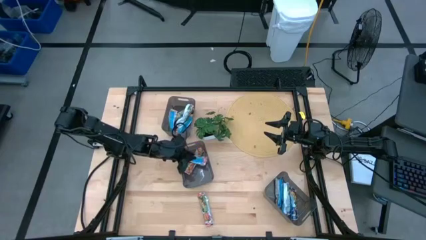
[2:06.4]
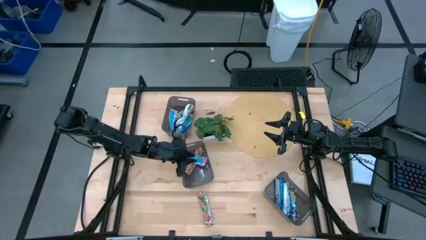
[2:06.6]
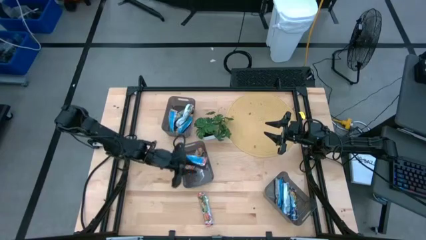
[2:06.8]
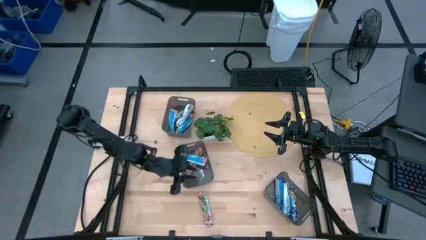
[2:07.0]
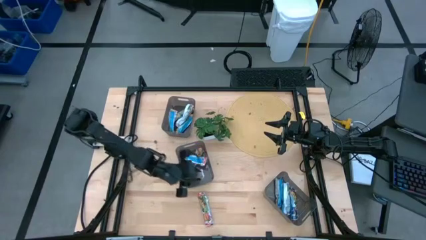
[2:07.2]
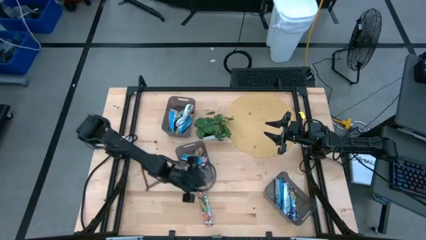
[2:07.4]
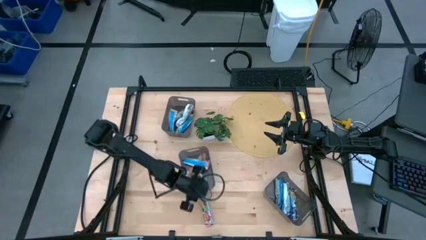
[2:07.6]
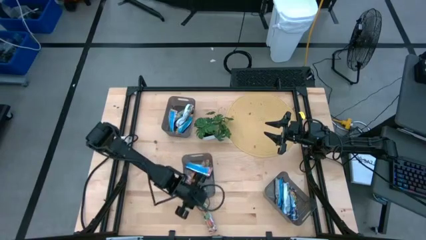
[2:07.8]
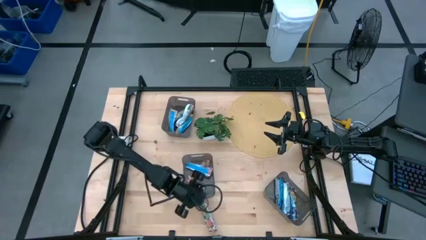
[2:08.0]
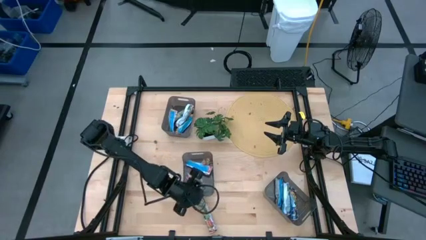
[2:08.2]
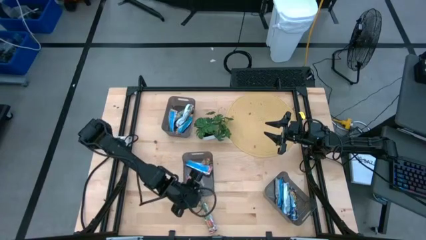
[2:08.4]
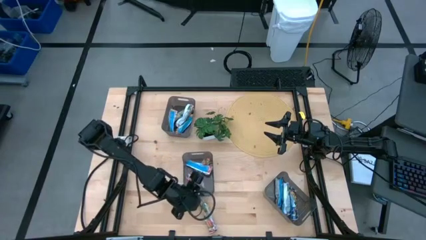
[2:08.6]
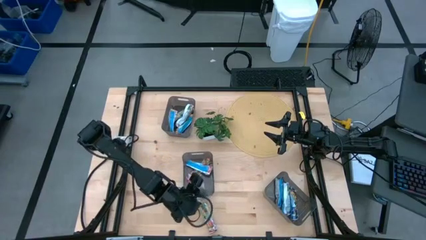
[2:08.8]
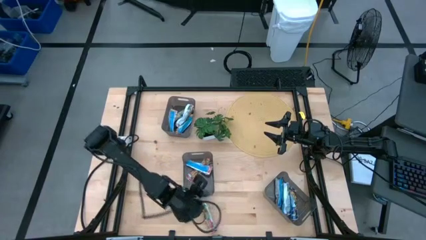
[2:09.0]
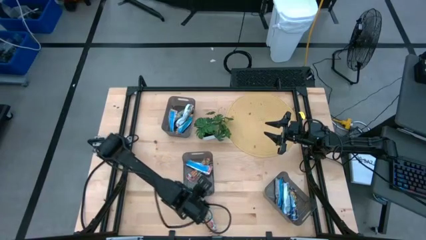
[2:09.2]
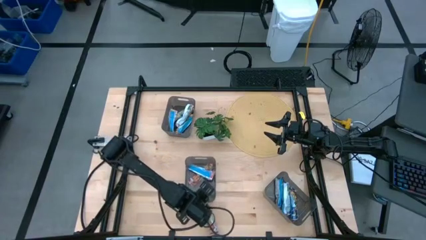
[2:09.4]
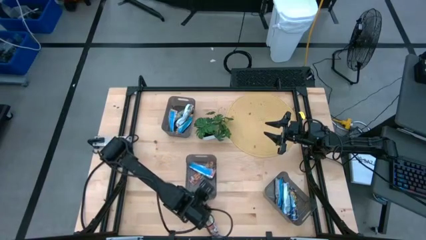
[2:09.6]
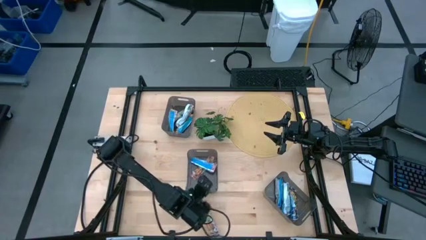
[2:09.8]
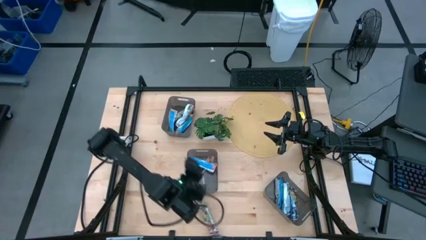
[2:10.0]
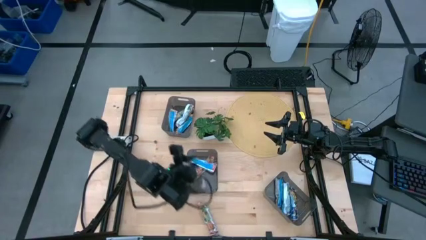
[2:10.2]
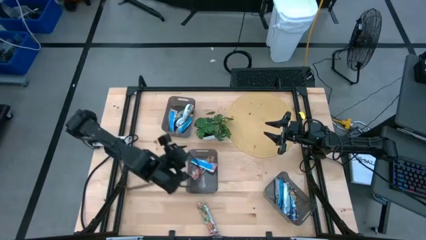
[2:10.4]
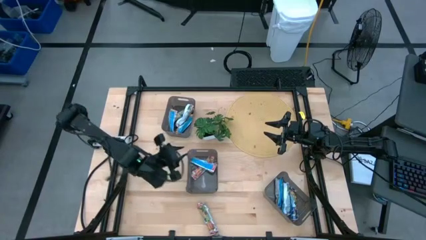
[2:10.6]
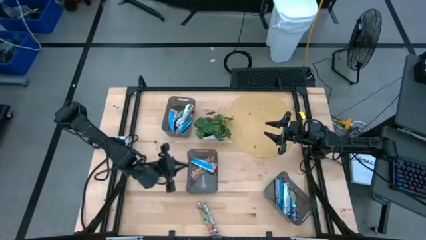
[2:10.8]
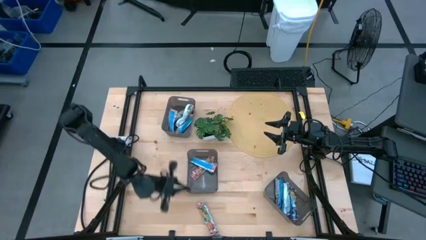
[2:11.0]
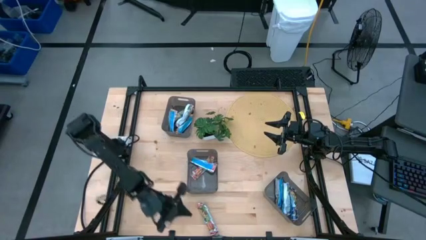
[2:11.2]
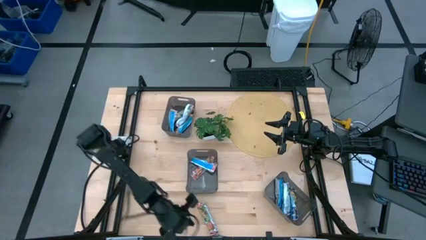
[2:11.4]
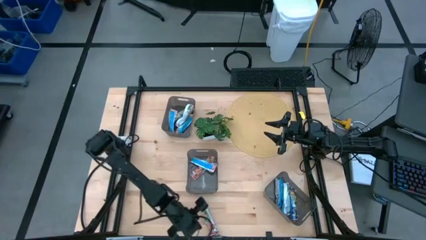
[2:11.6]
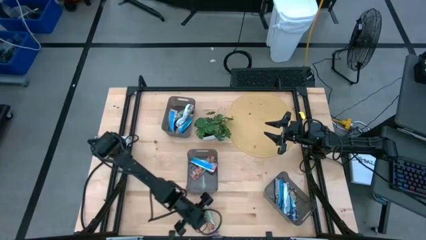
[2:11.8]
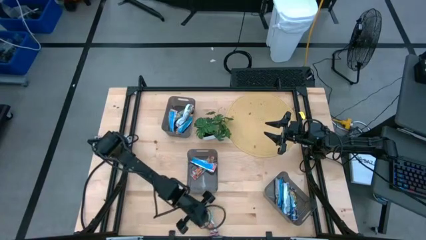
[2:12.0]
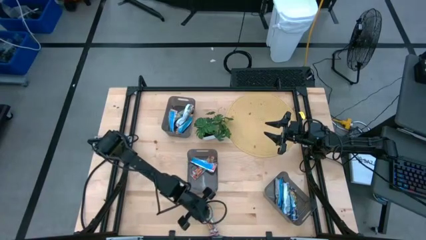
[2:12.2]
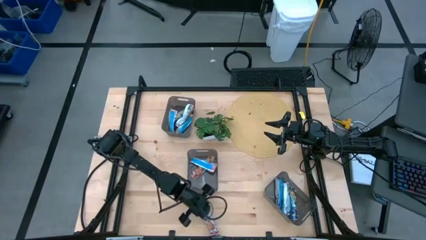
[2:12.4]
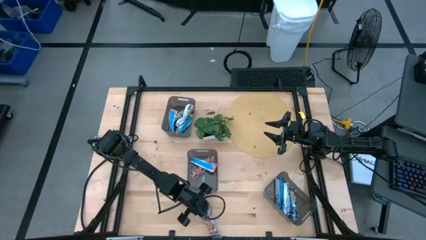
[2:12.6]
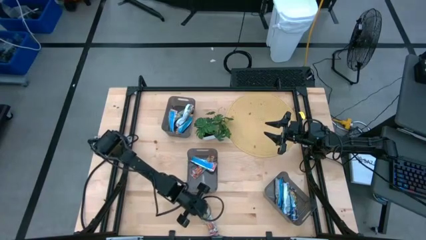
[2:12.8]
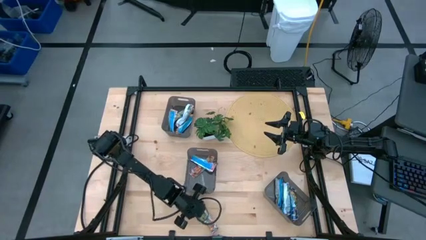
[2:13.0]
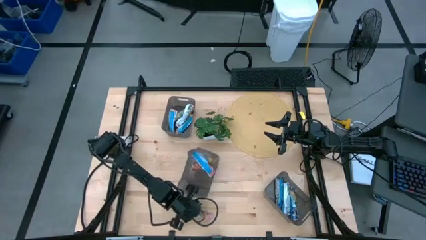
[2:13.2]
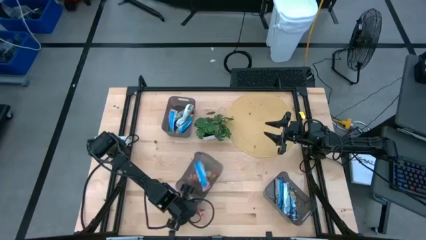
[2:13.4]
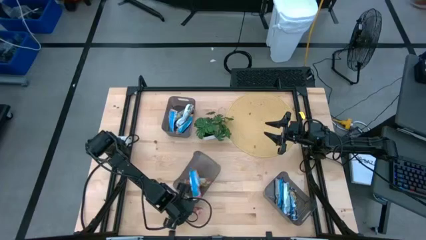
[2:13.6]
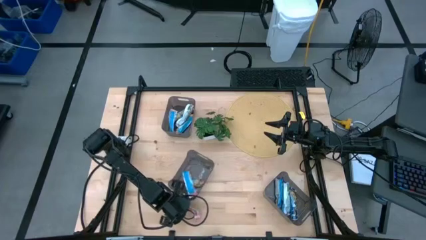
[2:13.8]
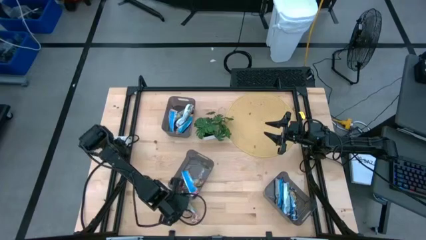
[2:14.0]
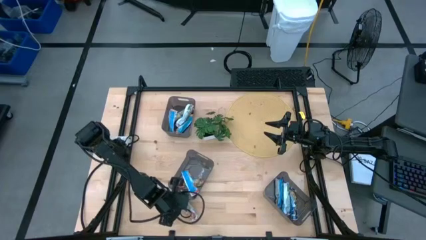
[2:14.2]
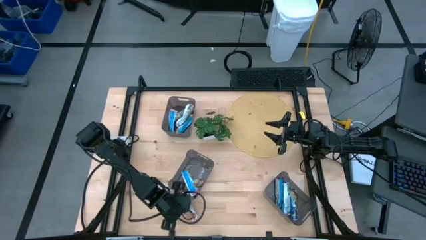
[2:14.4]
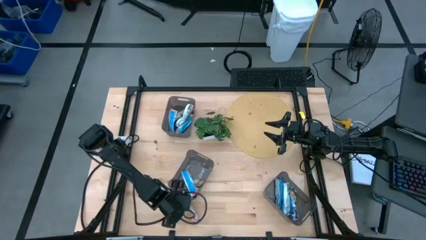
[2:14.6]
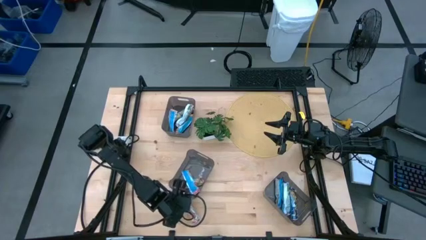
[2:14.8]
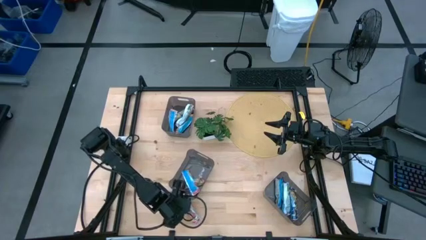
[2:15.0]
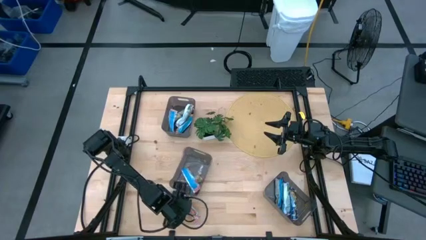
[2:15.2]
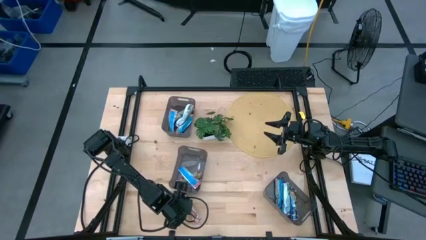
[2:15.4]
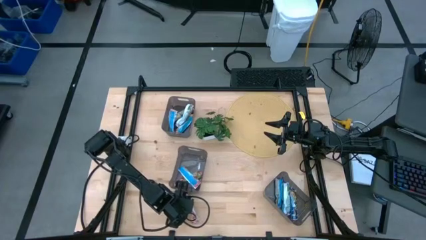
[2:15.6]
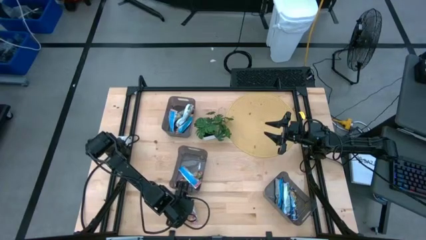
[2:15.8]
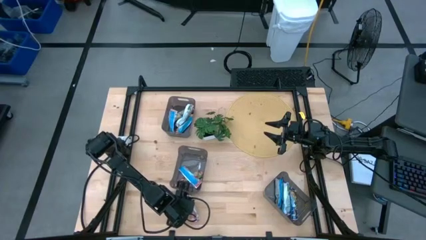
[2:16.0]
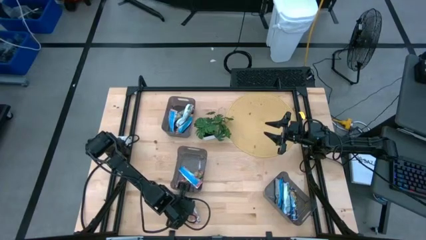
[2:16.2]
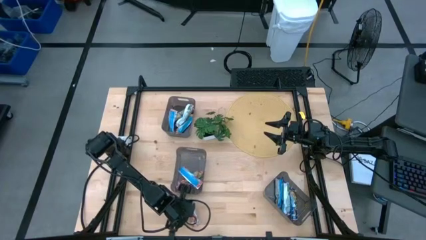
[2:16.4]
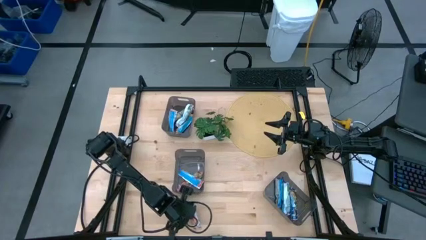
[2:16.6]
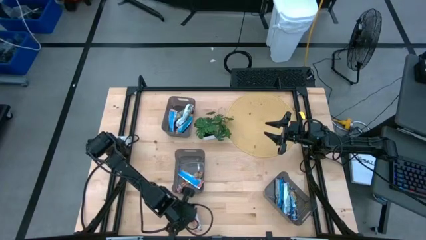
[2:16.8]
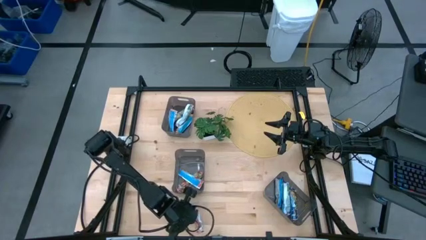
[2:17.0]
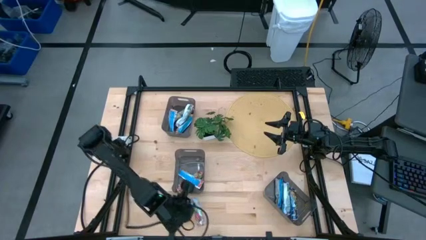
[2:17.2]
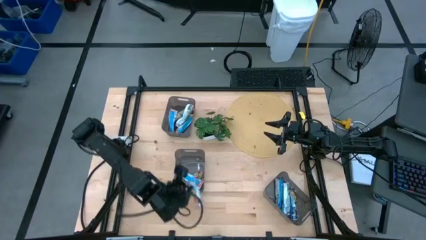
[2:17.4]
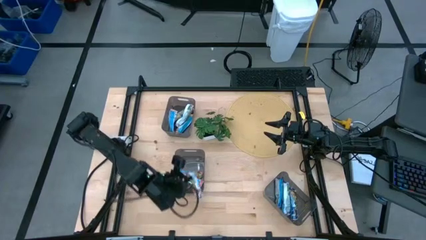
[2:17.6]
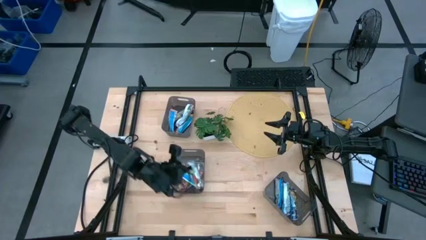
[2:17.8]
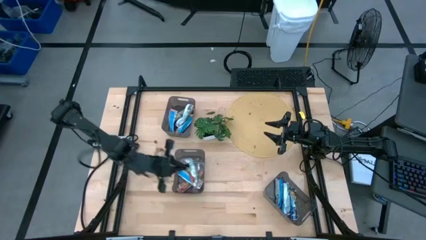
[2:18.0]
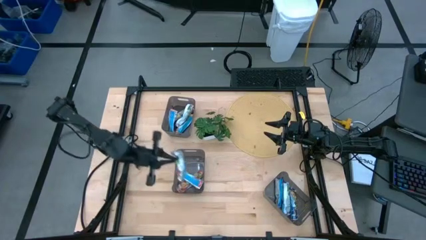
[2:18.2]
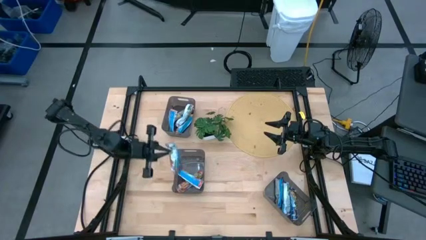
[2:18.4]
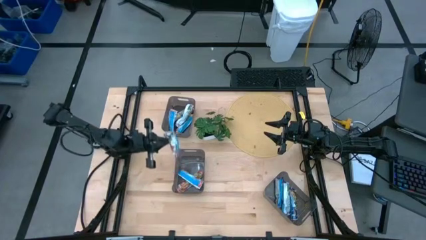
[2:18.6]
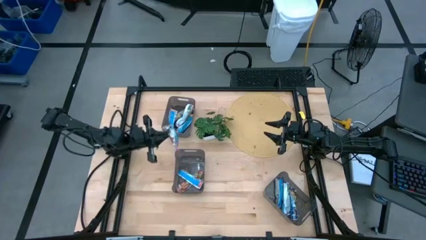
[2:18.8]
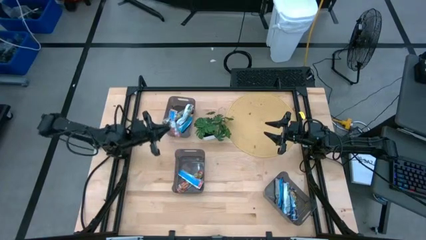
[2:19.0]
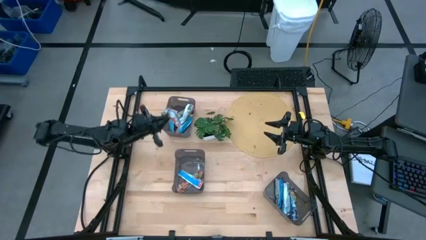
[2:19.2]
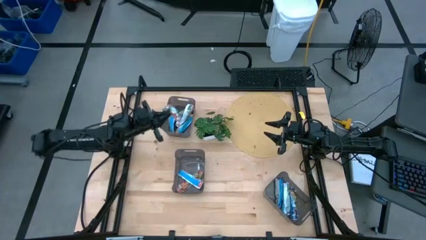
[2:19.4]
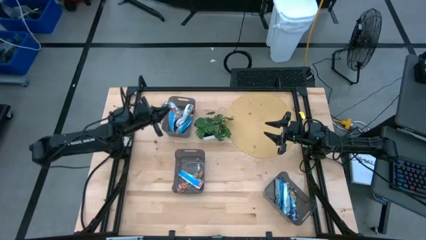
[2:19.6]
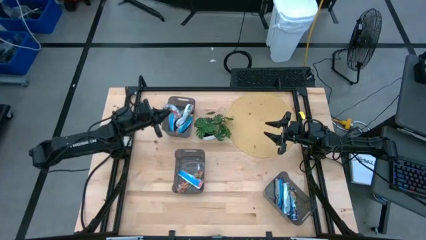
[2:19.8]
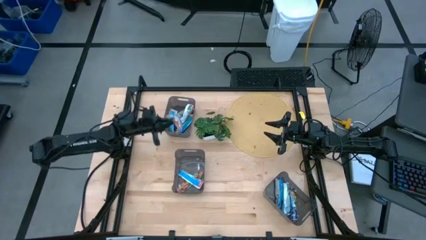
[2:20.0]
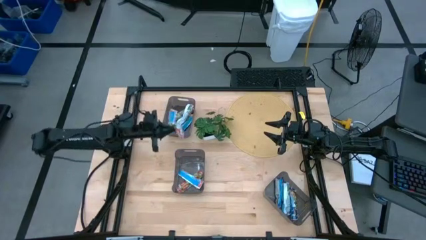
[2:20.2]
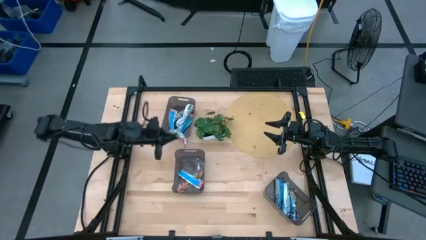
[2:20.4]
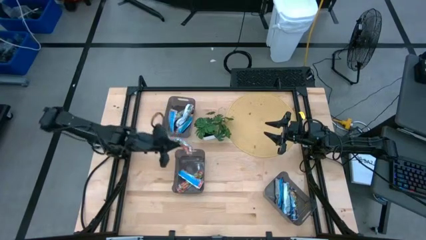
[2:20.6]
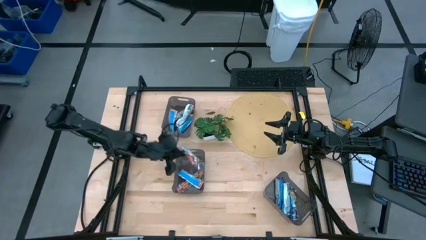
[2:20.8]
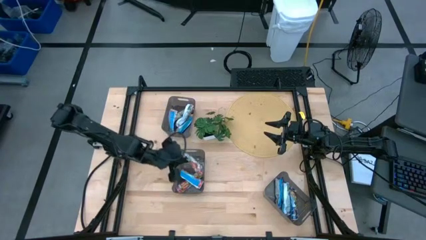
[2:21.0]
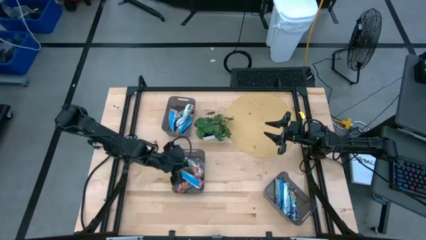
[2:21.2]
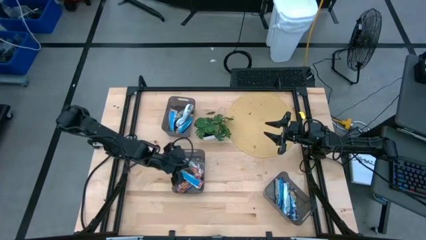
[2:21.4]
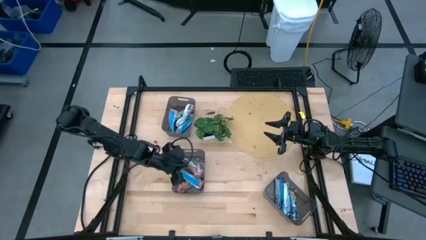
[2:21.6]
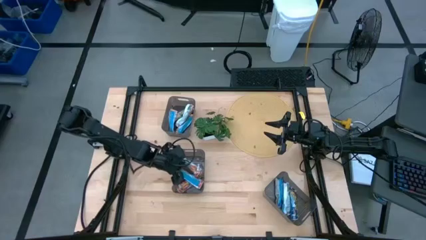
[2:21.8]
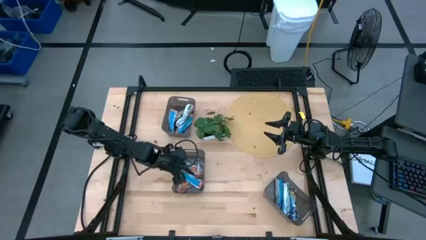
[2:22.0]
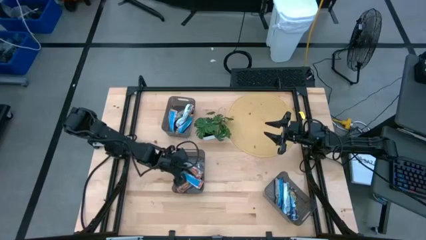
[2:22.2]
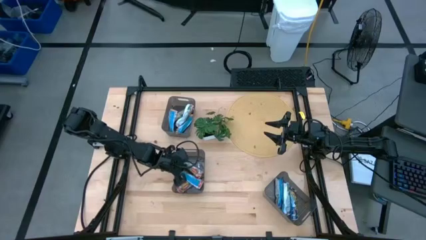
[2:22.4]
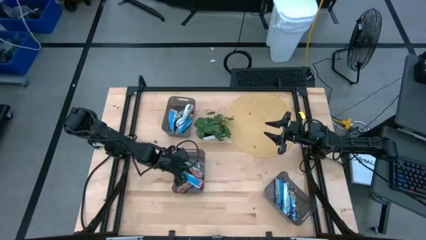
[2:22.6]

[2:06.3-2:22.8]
Task: Pick and place Granola Bars by type
Put the red granola bar into the bottom left black bin
